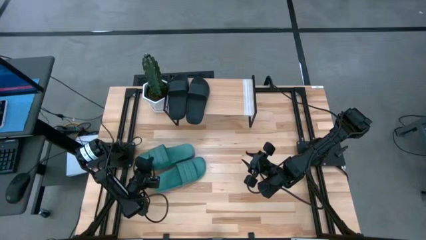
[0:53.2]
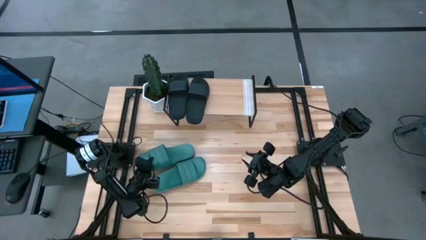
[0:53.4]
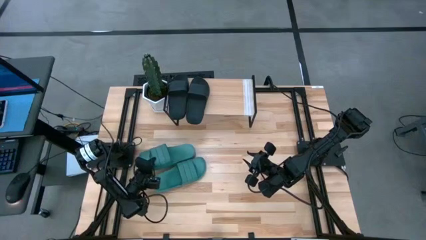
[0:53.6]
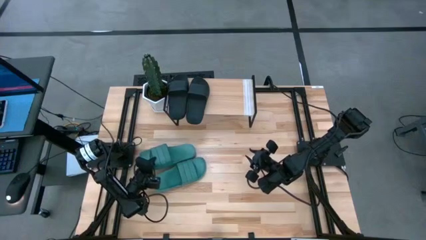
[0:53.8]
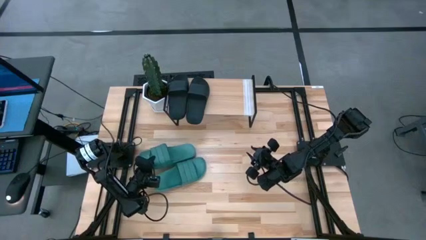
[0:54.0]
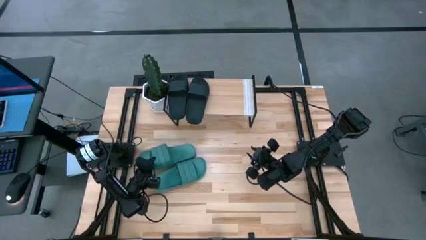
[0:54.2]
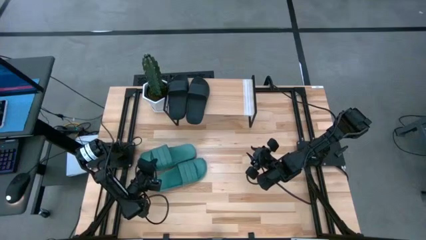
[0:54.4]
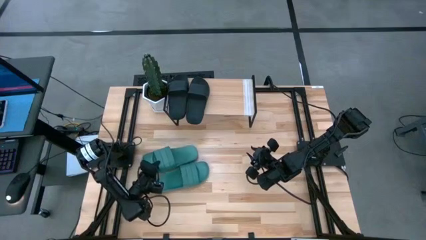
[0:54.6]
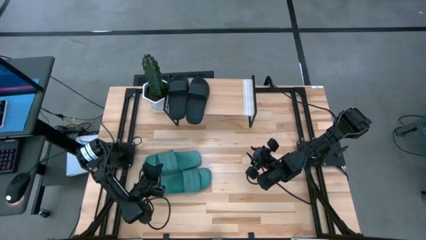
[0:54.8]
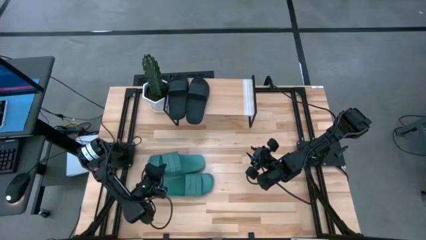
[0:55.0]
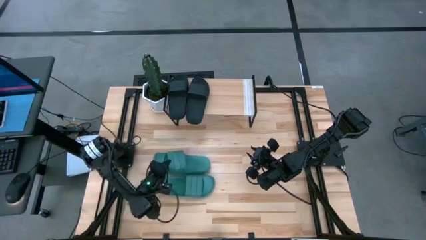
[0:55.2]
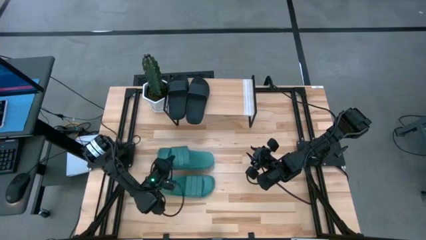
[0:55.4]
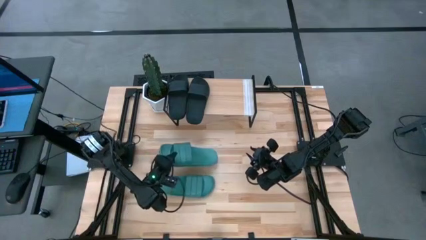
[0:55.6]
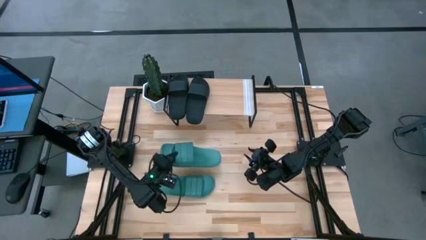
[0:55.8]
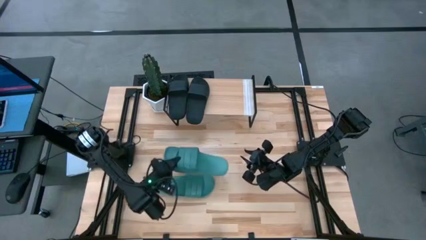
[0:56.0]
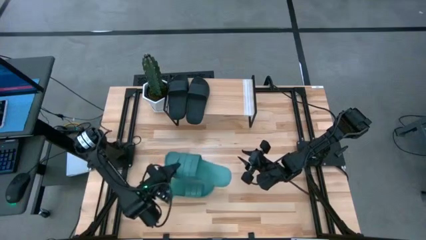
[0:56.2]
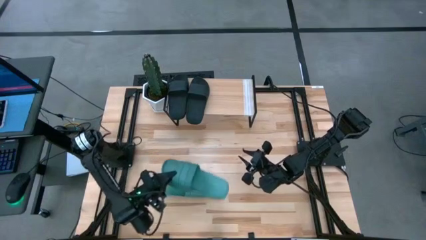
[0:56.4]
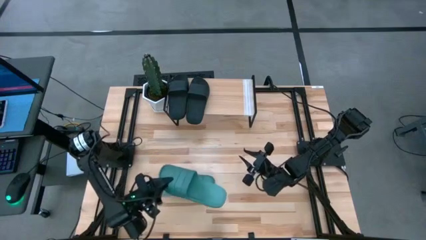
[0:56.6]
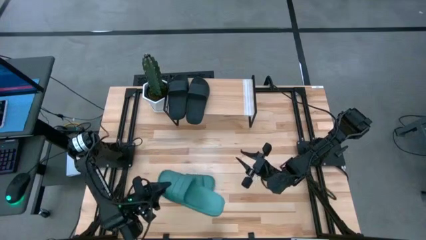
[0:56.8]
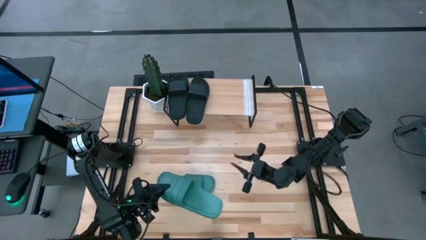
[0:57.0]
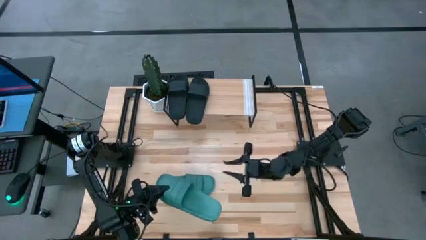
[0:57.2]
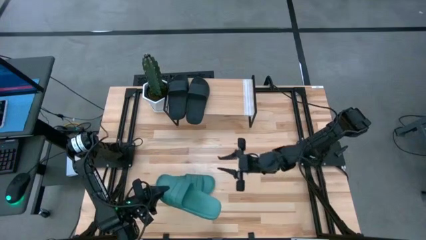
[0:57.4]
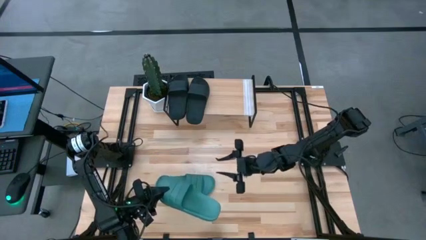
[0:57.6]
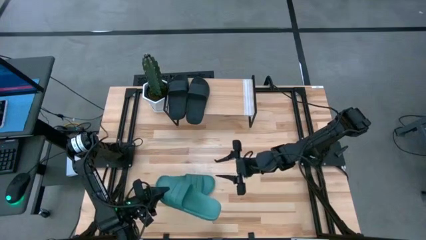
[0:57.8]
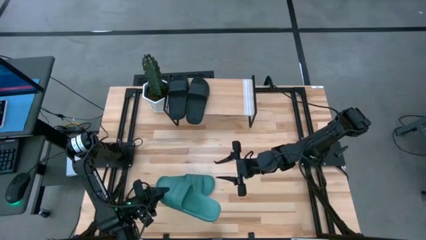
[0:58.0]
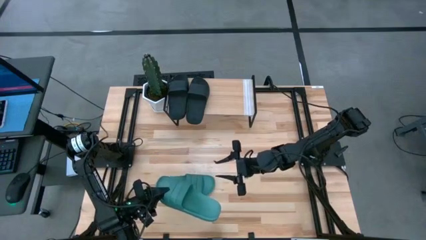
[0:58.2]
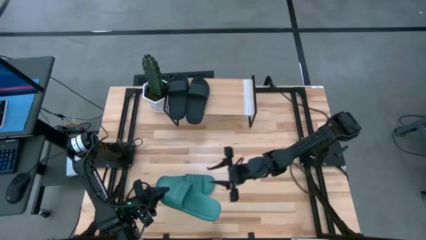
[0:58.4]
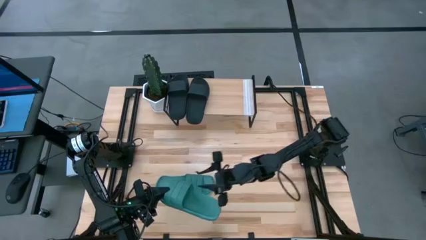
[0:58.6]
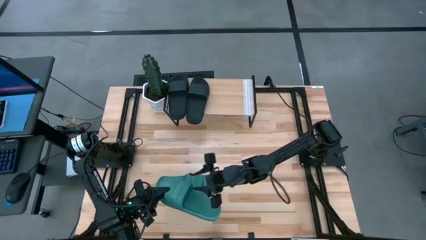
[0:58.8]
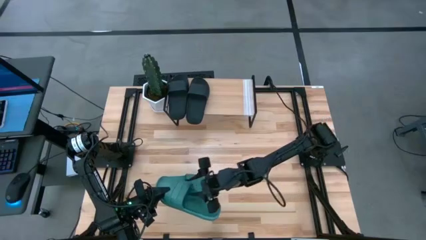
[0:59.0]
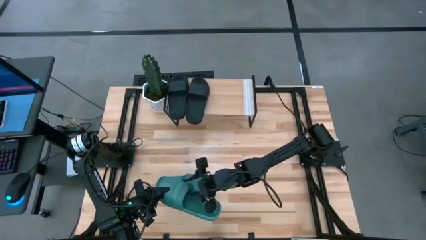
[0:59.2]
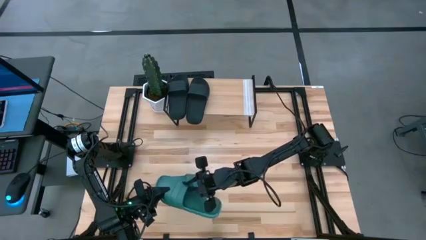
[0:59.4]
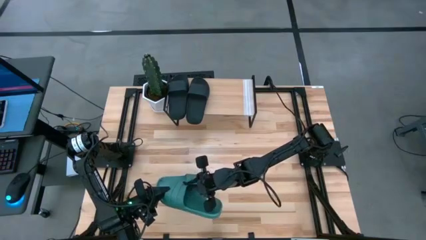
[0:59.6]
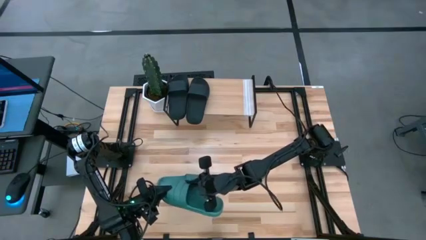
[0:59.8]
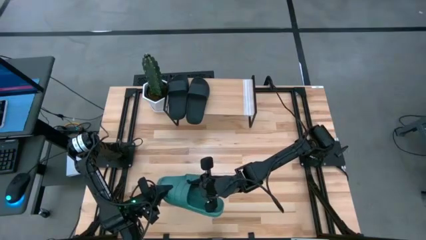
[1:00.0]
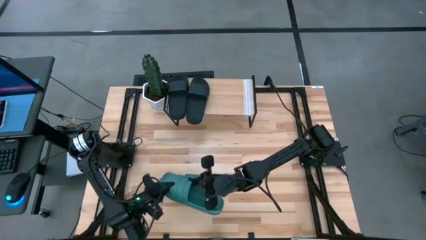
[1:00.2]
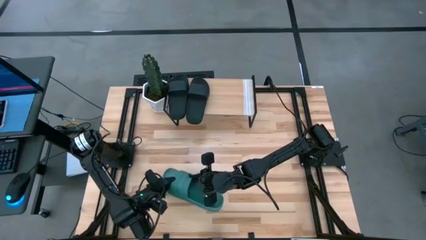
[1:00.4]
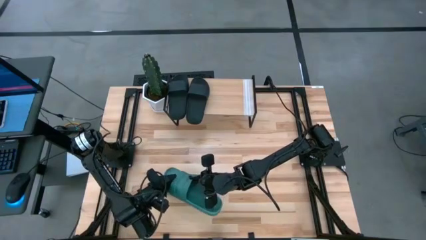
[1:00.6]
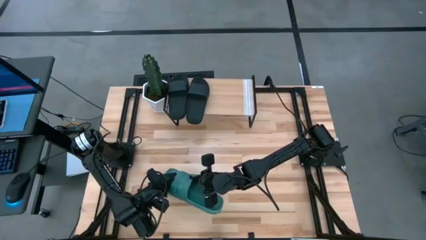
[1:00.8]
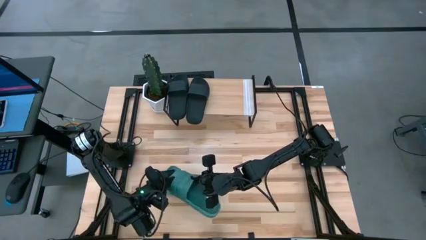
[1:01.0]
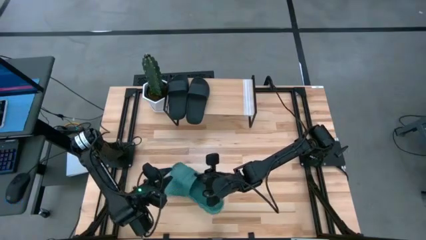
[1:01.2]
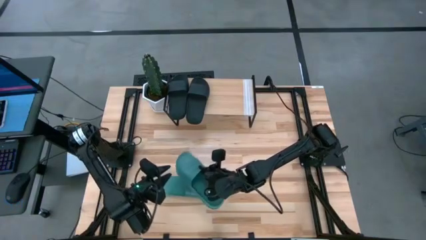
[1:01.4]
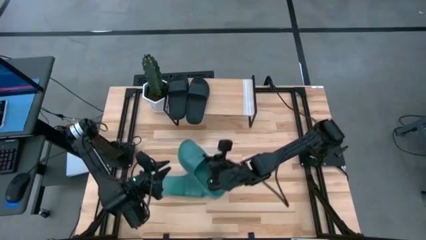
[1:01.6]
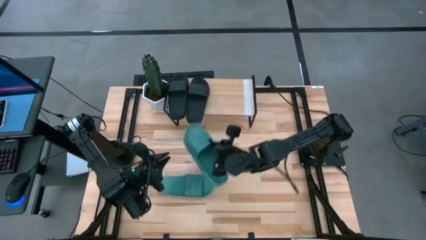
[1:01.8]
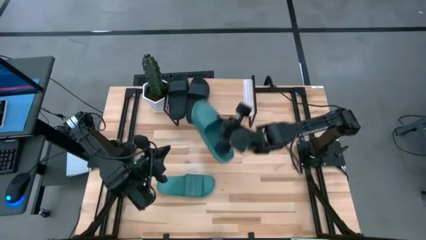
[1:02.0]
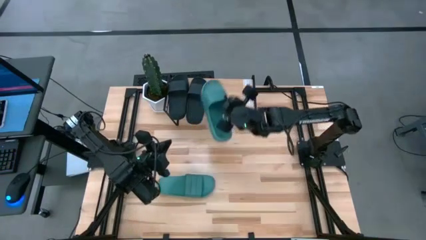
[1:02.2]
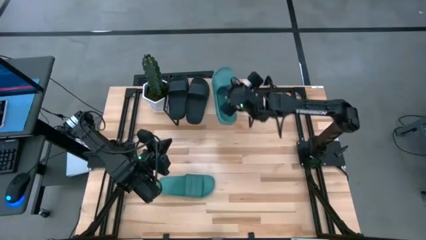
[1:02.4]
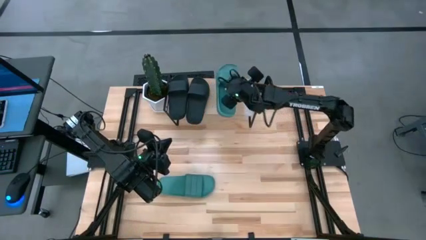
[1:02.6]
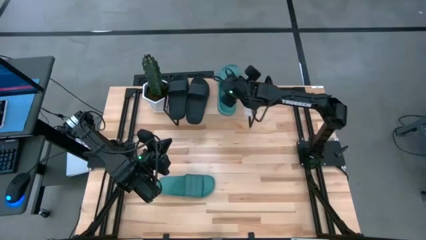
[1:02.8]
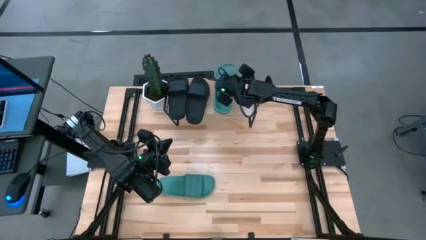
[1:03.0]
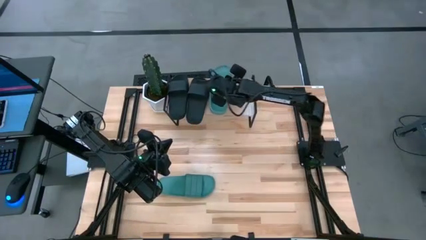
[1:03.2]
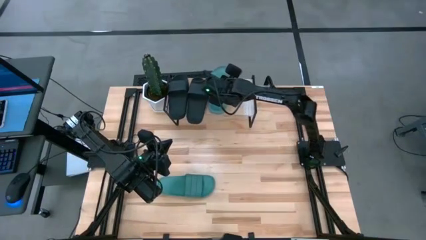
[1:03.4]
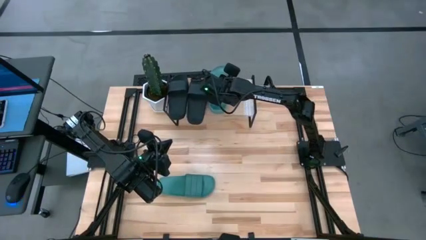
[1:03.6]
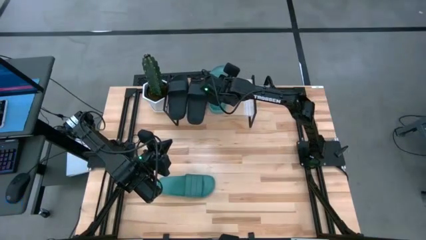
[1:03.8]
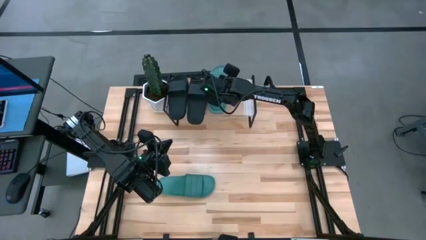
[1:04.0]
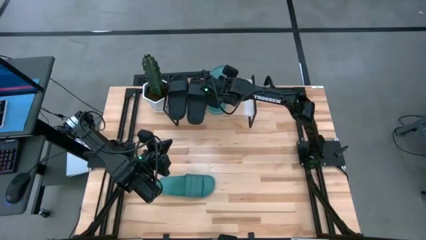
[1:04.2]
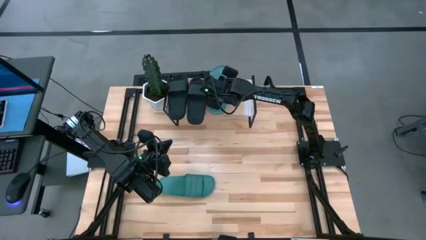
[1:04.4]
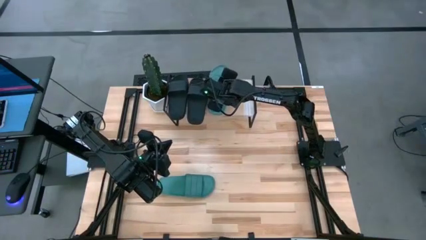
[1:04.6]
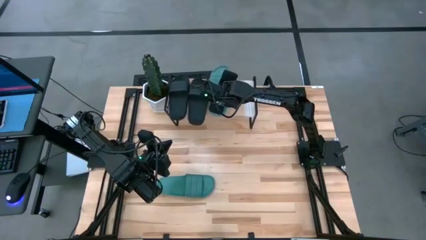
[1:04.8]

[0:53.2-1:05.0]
Task: Pick and place slides into the shelf
Put the top green slide on the shelf
